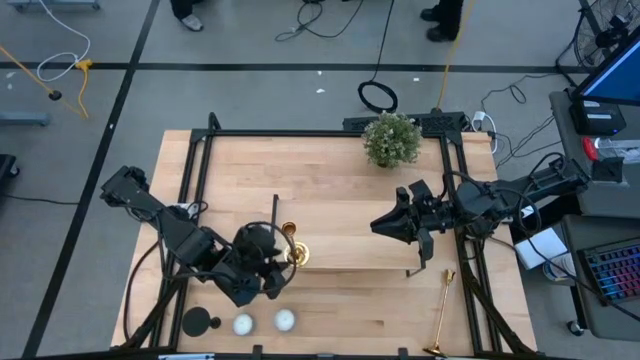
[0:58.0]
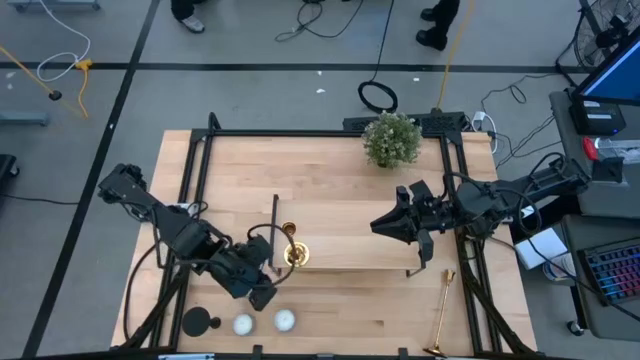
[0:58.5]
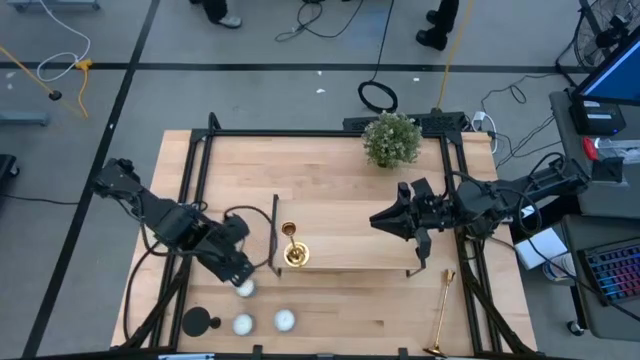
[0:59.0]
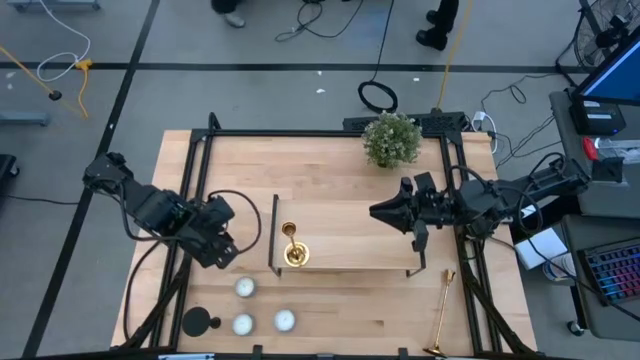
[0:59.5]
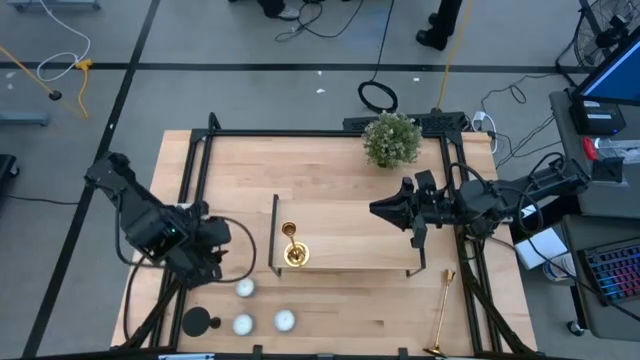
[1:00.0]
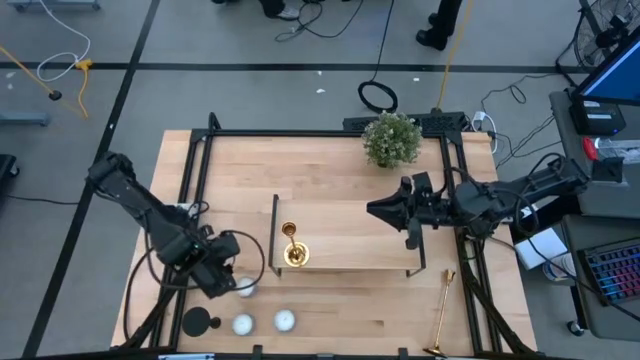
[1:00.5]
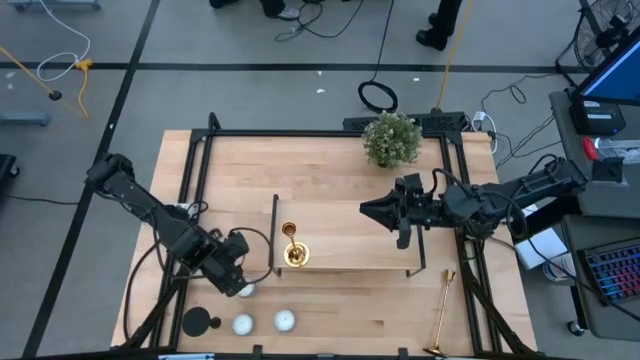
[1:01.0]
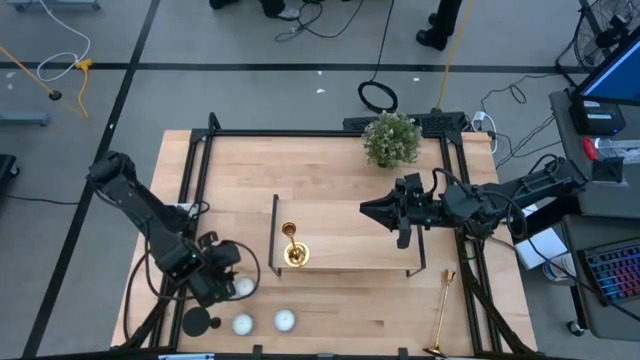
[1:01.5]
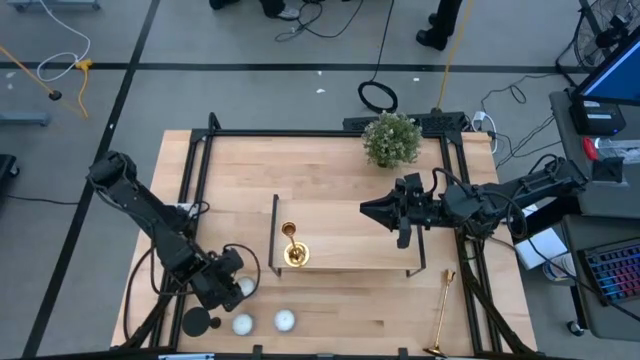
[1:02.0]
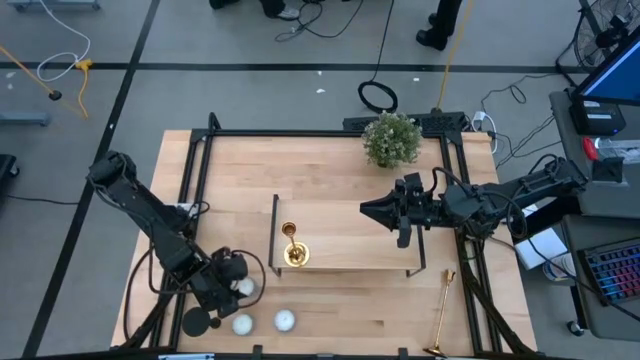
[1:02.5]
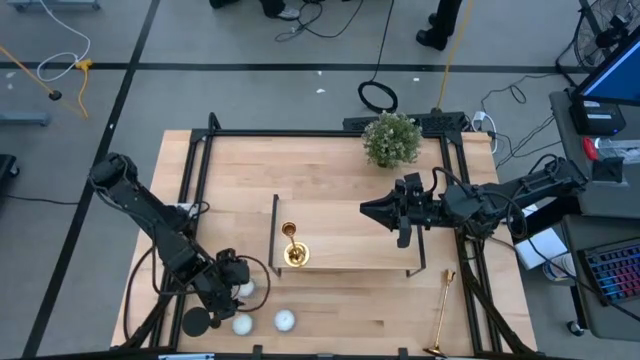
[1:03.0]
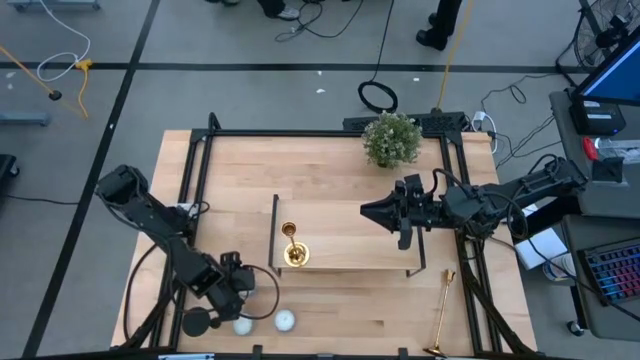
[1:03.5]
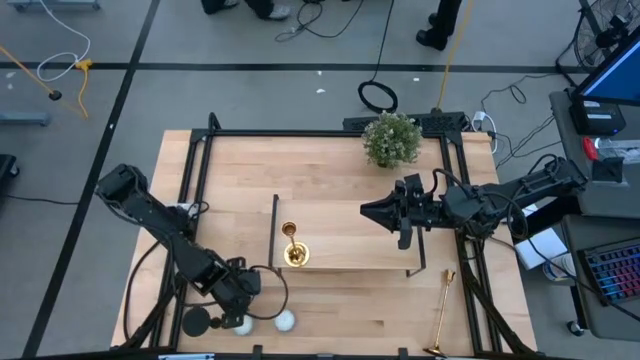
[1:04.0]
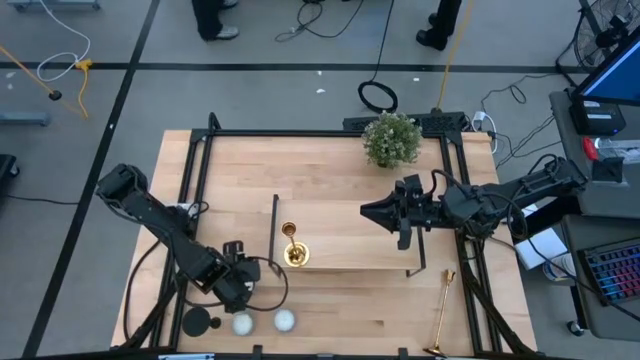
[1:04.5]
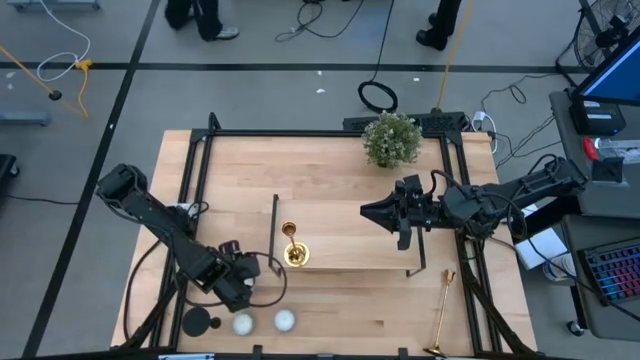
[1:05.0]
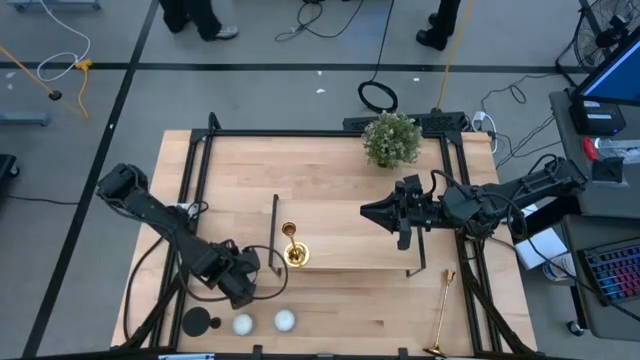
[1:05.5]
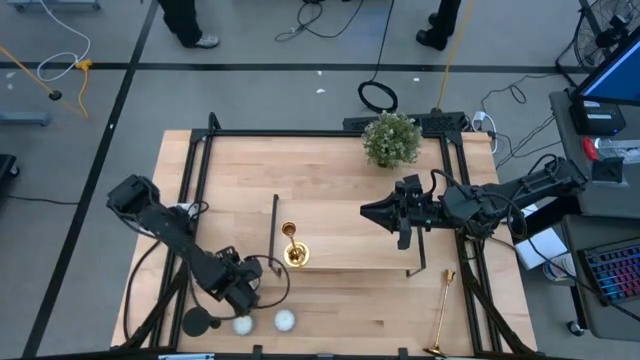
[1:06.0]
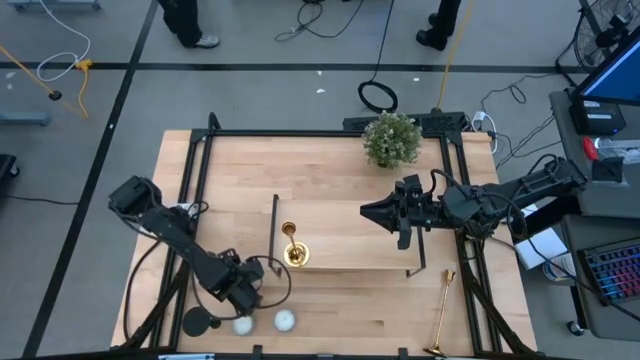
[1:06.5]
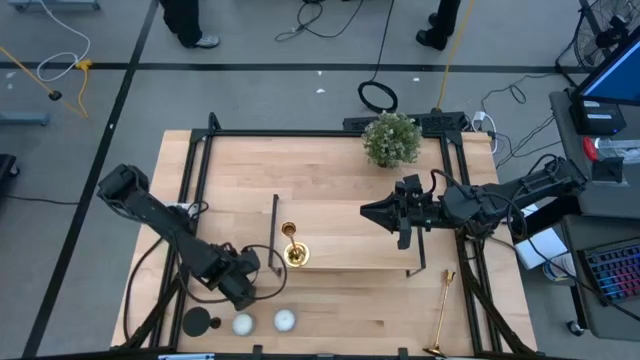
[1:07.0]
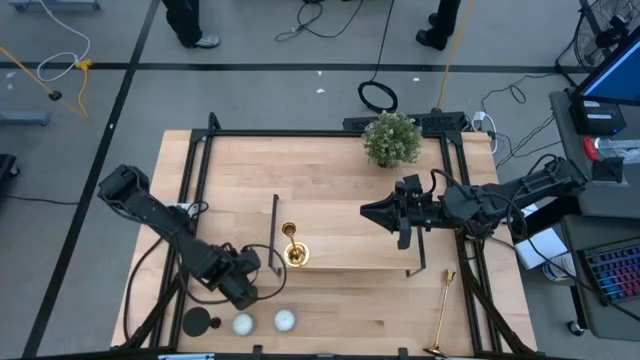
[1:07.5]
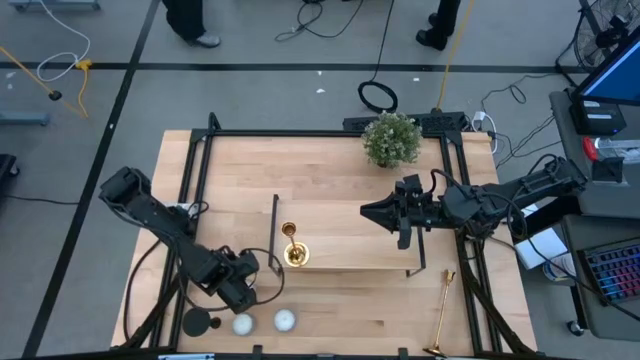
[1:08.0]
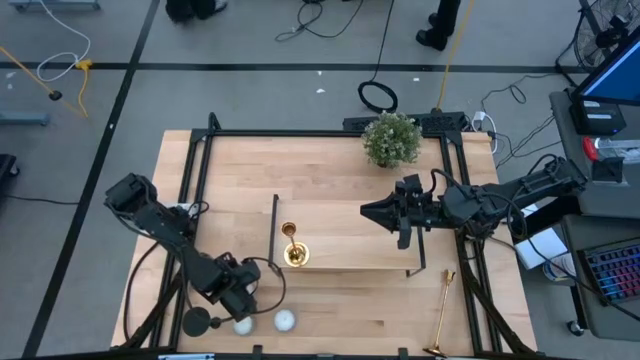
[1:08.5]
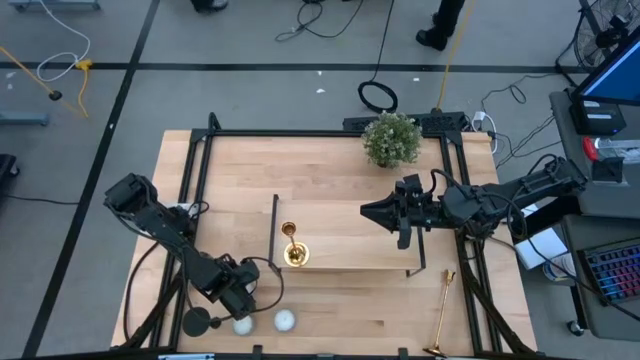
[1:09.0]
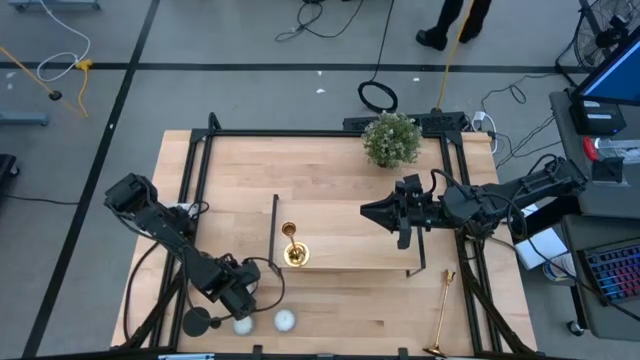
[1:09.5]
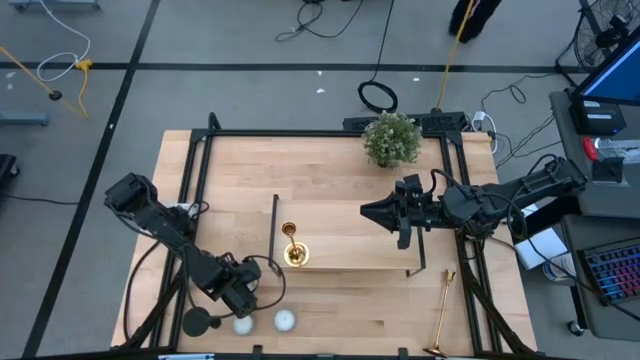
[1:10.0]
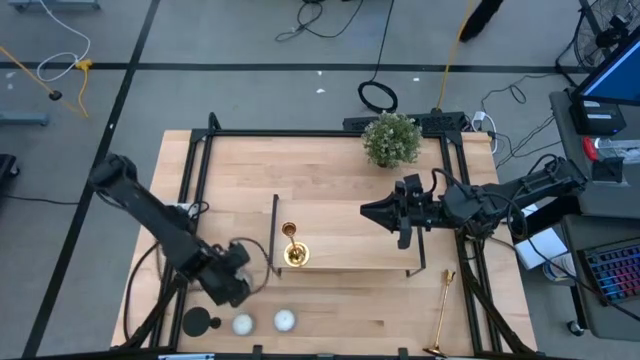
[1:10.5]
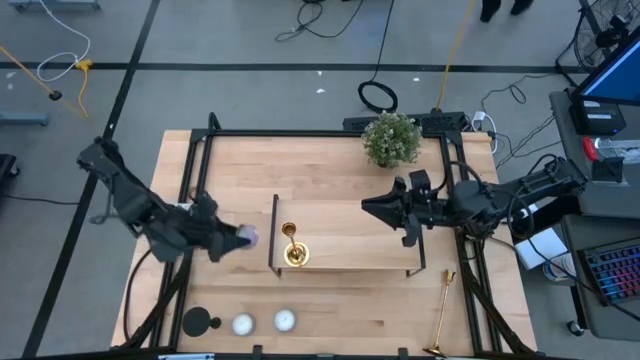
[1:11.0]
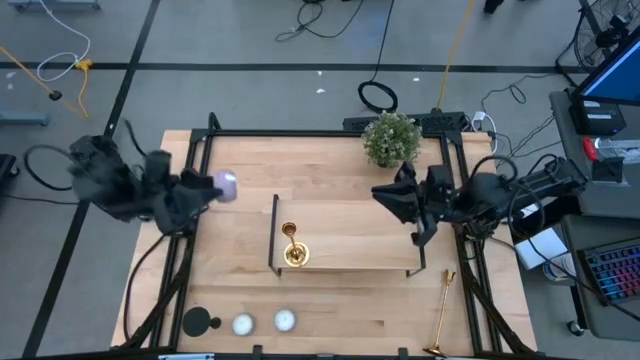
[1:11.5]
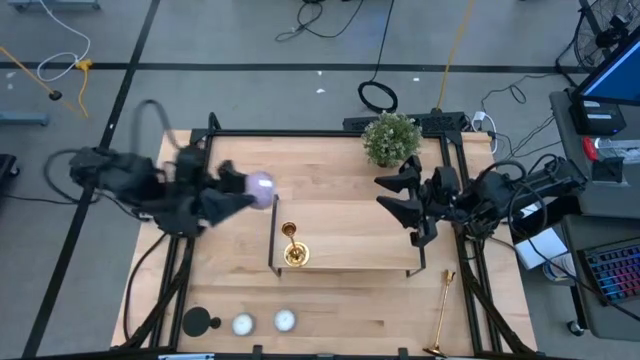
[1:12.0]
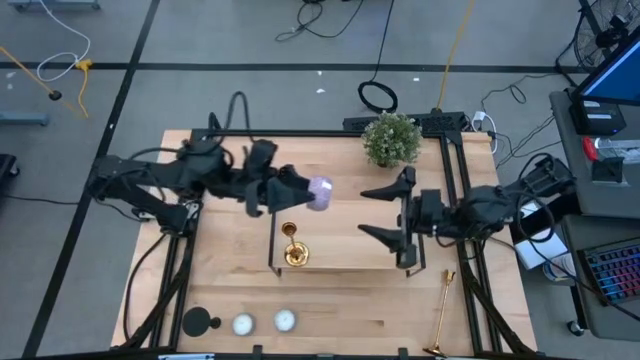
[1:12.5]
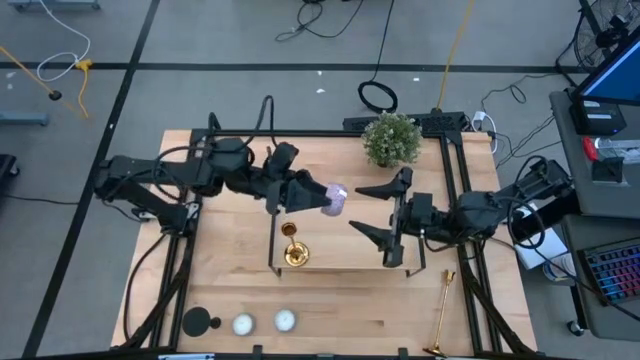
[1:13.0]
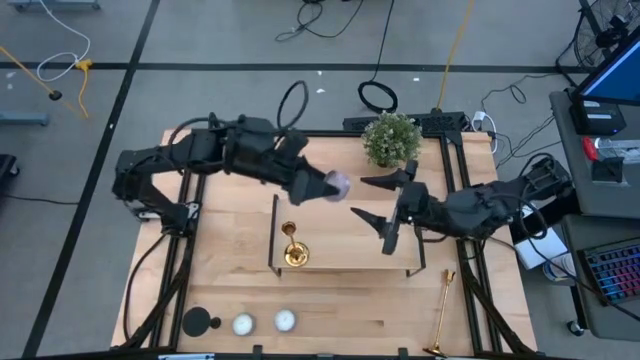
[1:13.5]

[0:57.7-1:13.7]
Task: Pick & Place candle stick holders
Put the pink scented candle on the shelf

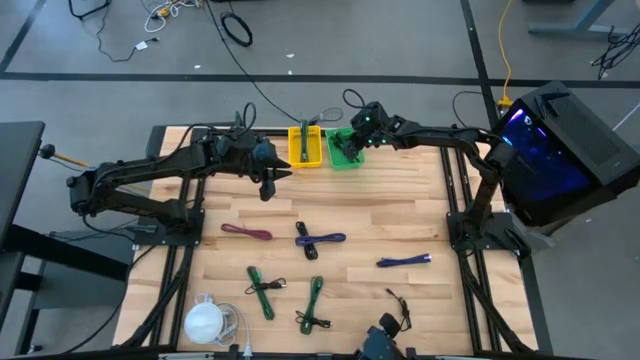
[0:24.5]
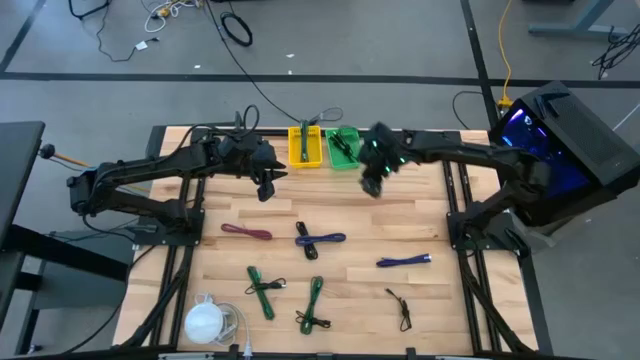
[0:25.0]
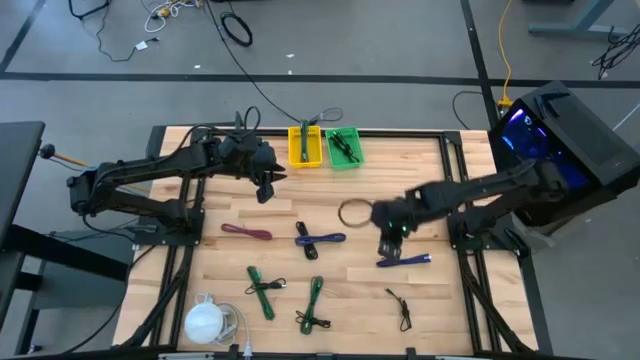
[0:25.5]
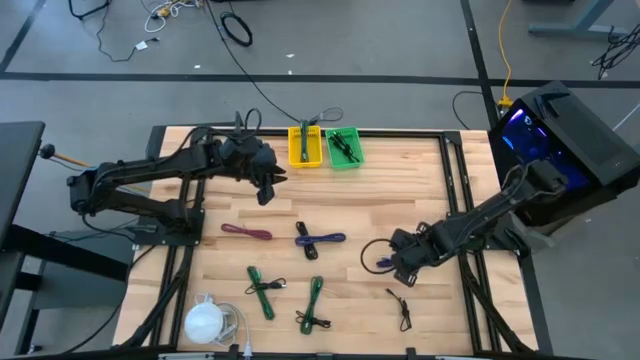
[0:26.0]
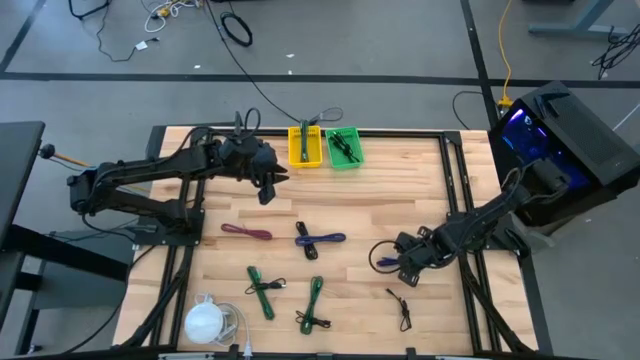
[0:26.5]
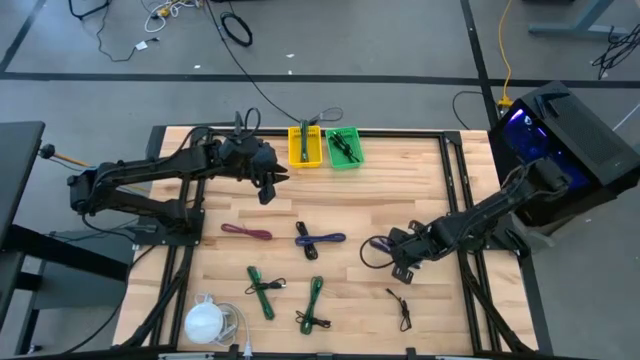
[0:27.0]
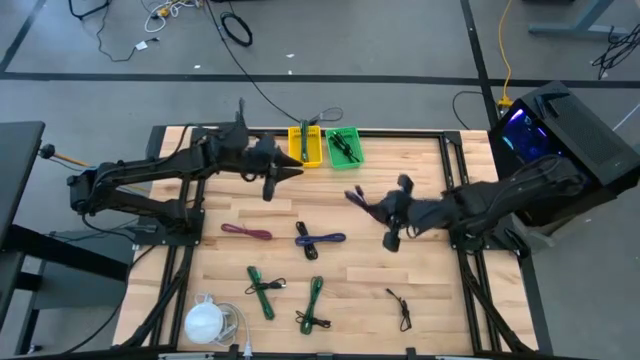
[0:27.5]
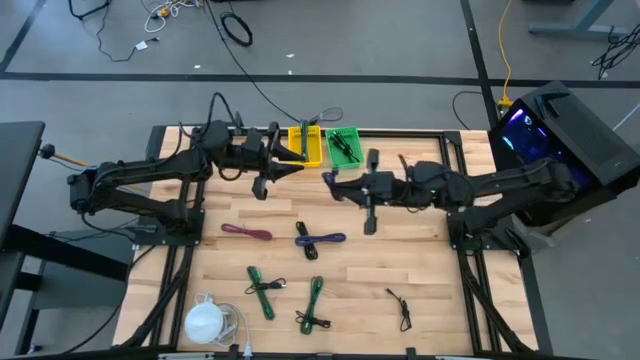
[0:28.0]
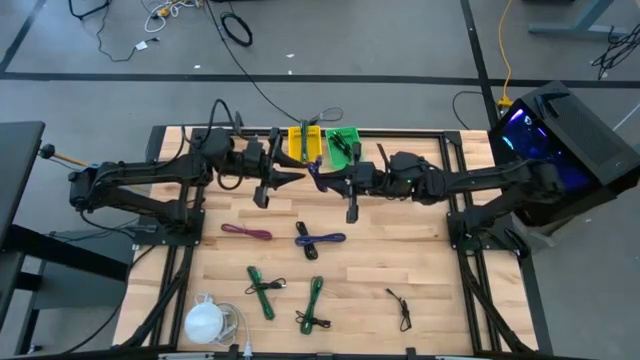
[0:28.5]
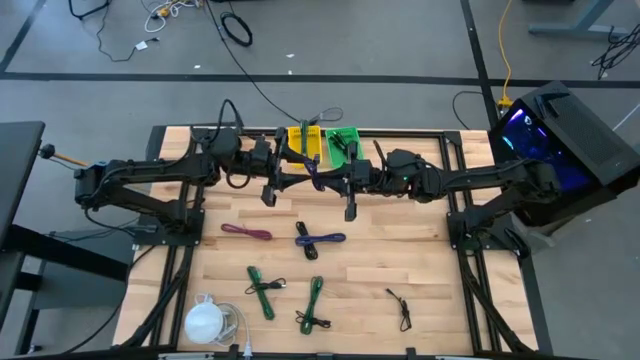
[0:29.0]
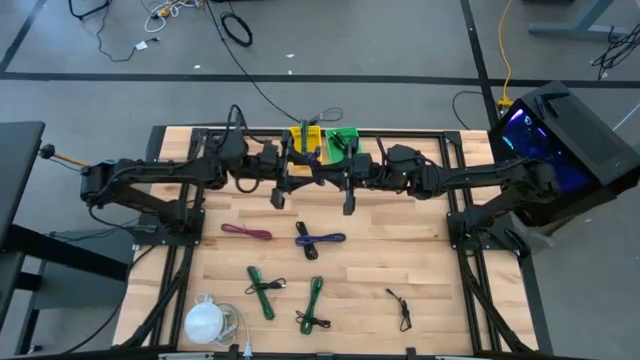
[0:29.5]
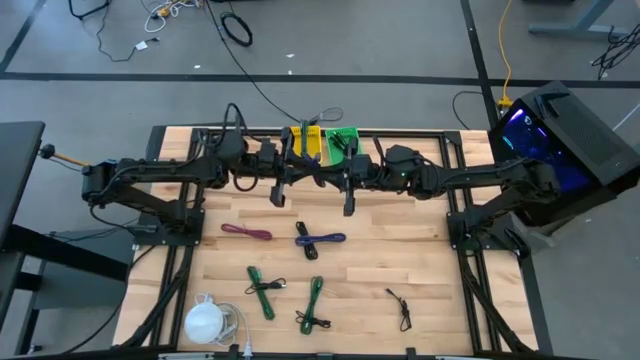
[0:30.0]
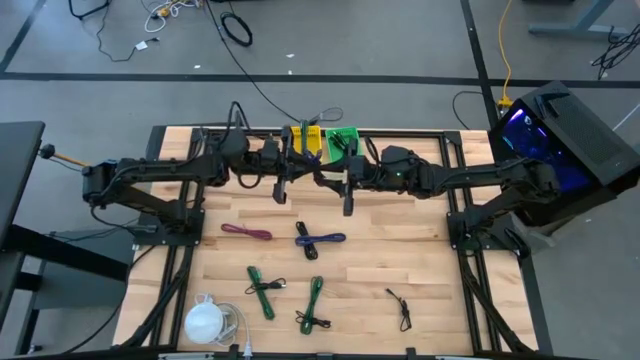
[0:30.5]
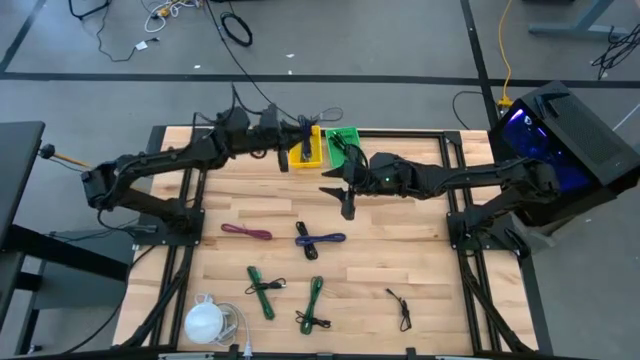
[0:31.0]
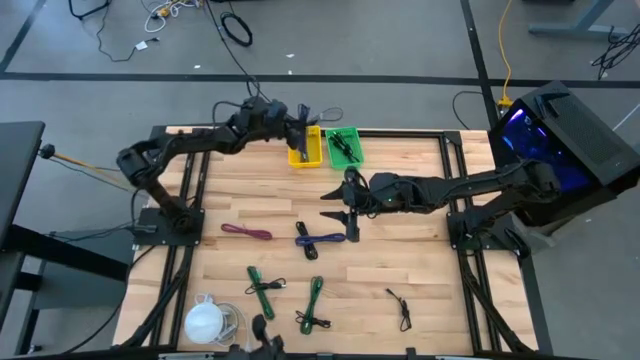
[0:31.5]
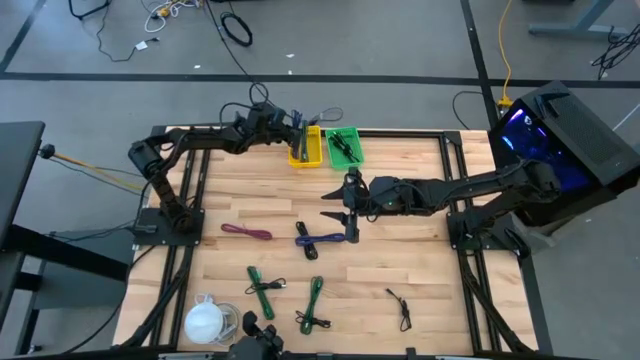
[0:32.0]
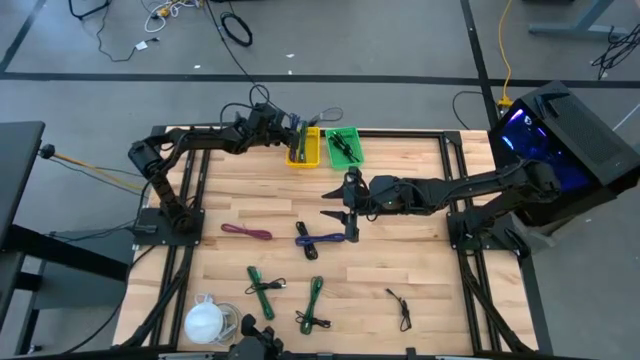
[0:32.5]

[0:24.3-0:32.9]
Task: Pick & Place USB Port
Put the purple charger cable into the yellow bin
